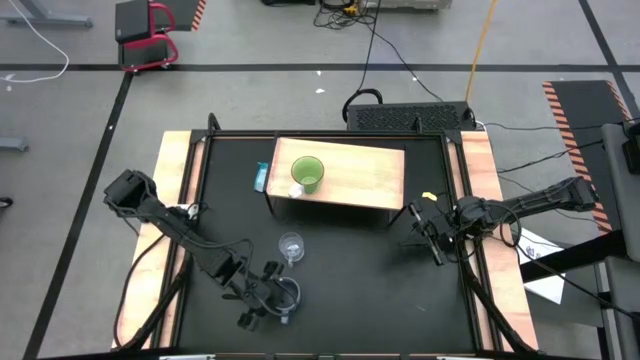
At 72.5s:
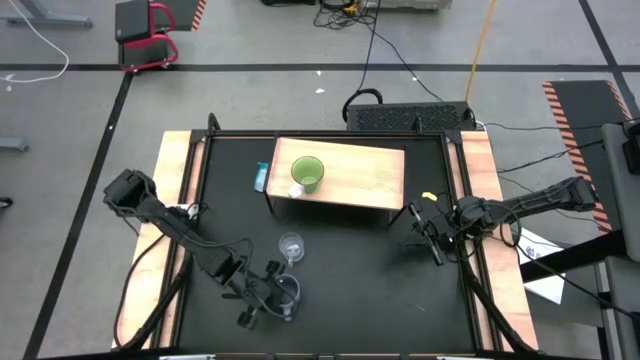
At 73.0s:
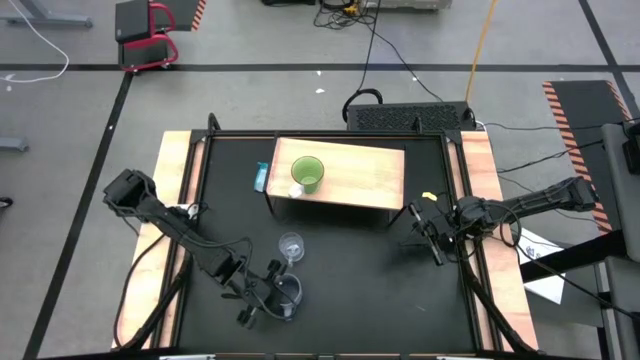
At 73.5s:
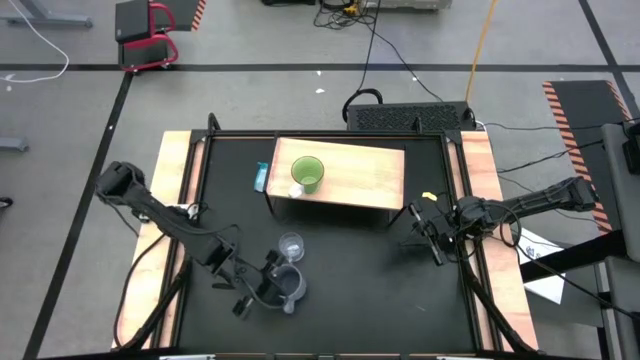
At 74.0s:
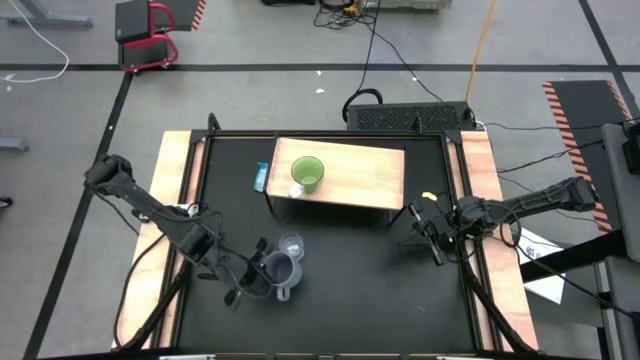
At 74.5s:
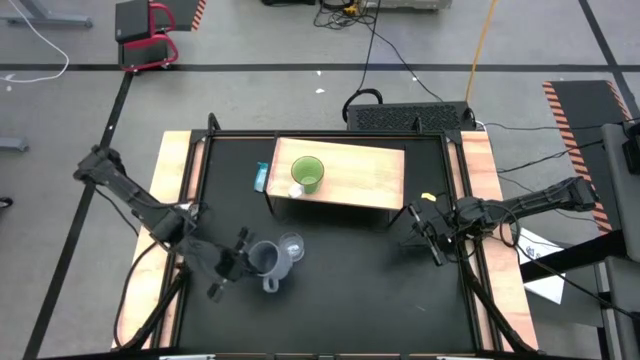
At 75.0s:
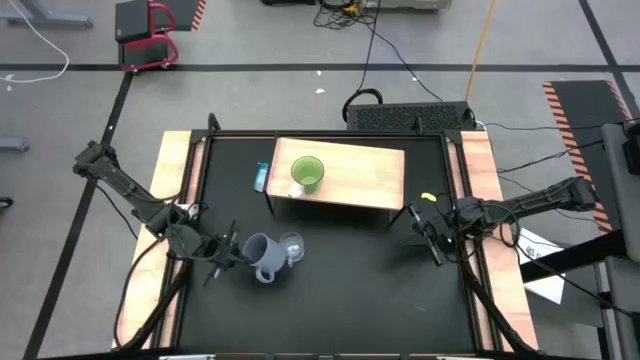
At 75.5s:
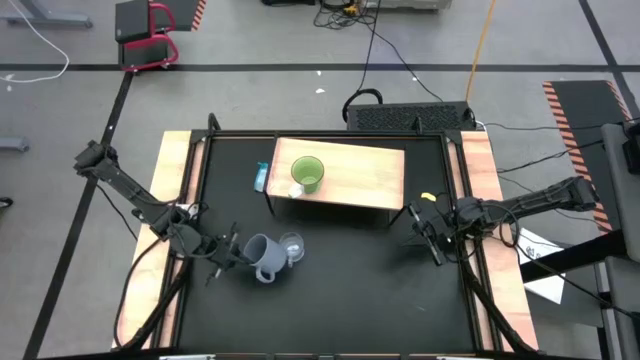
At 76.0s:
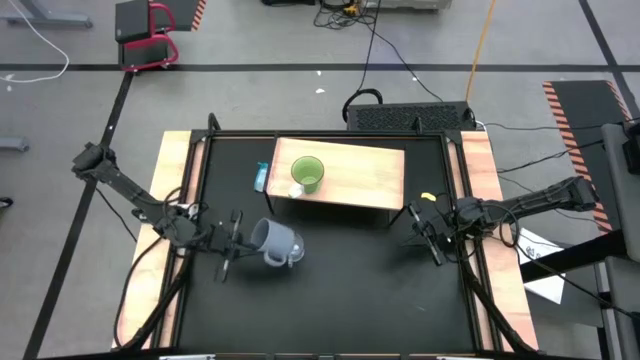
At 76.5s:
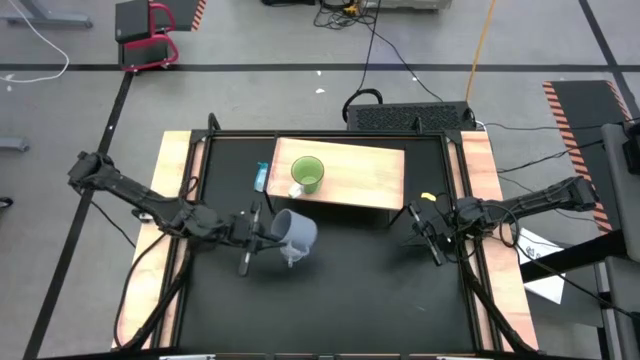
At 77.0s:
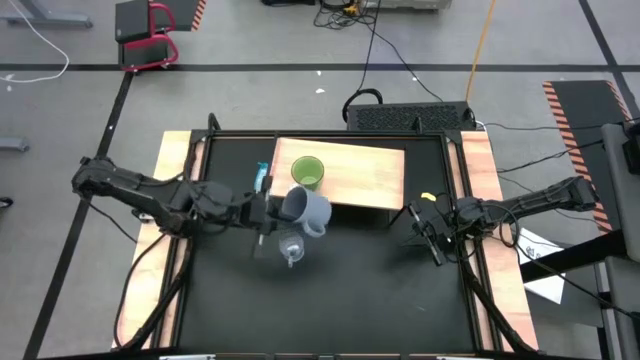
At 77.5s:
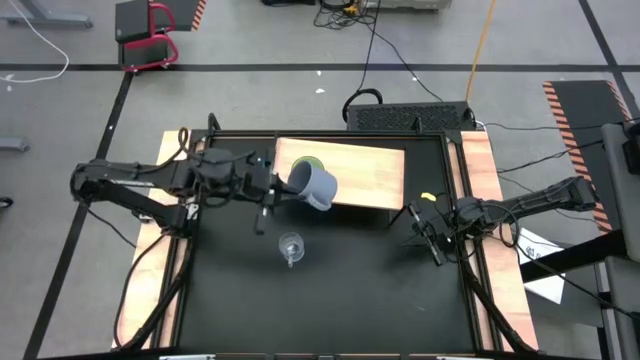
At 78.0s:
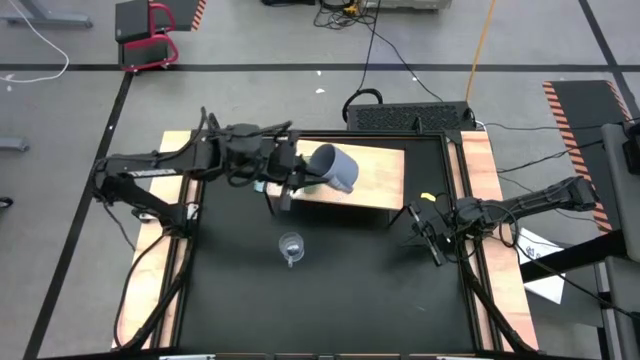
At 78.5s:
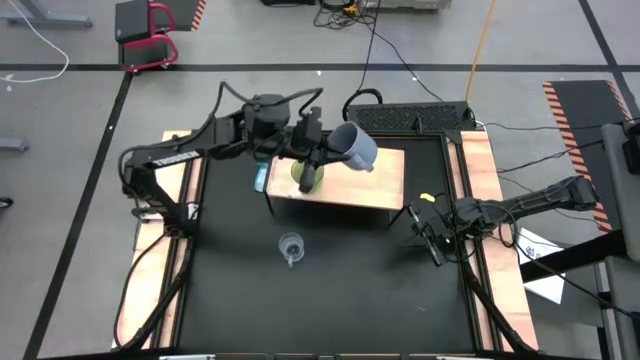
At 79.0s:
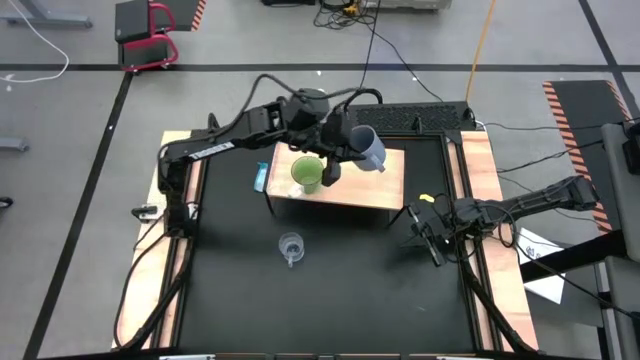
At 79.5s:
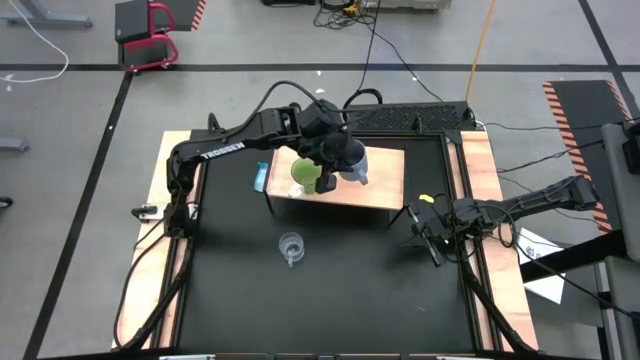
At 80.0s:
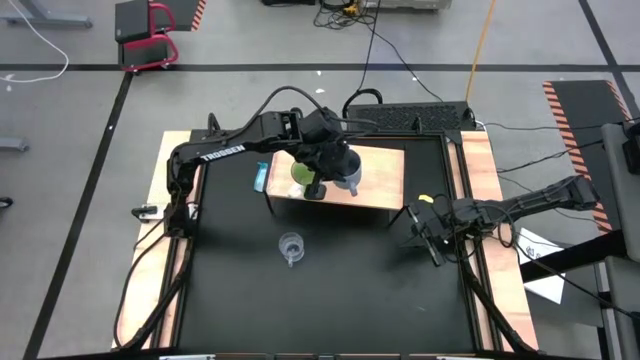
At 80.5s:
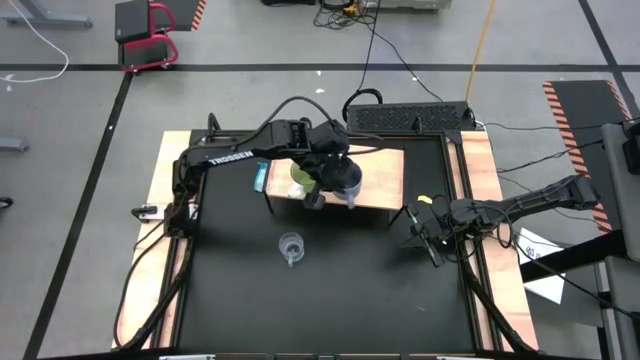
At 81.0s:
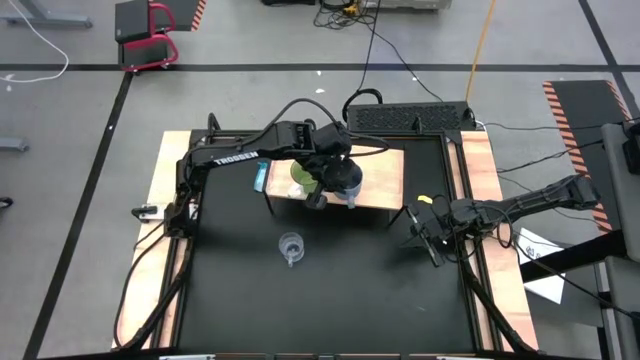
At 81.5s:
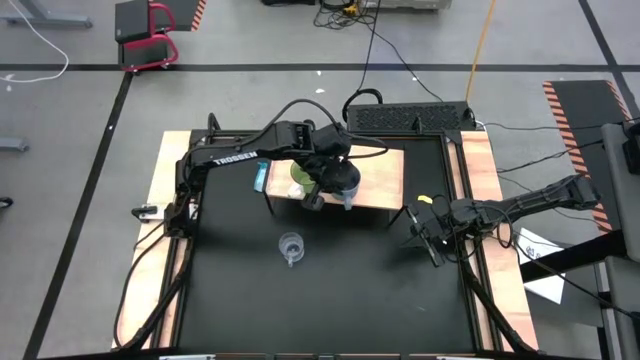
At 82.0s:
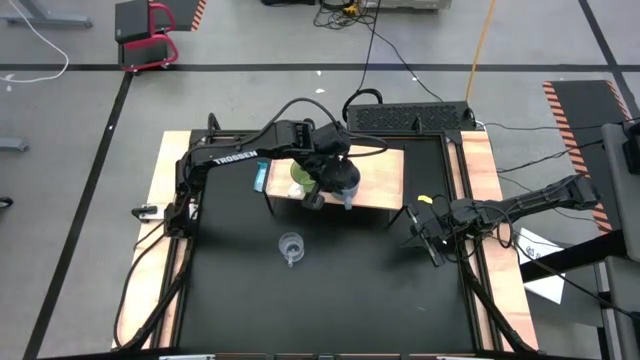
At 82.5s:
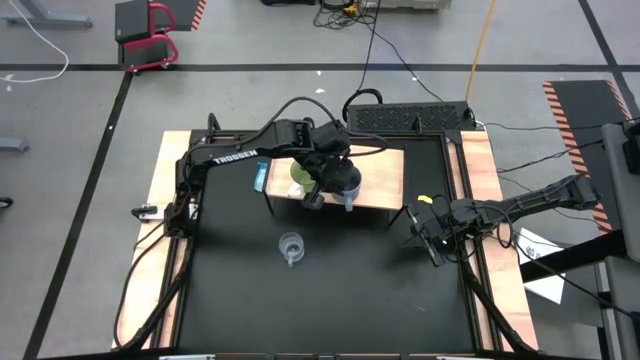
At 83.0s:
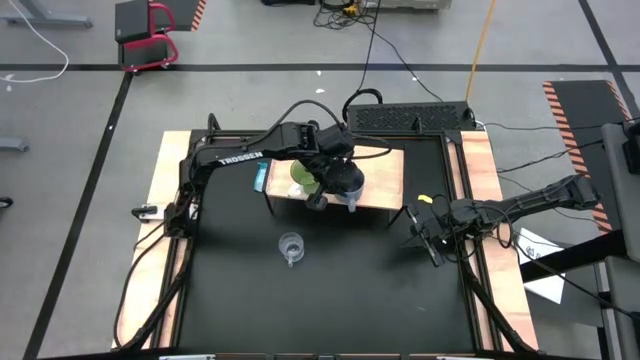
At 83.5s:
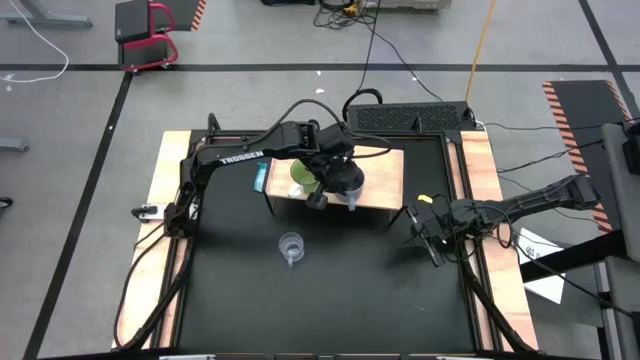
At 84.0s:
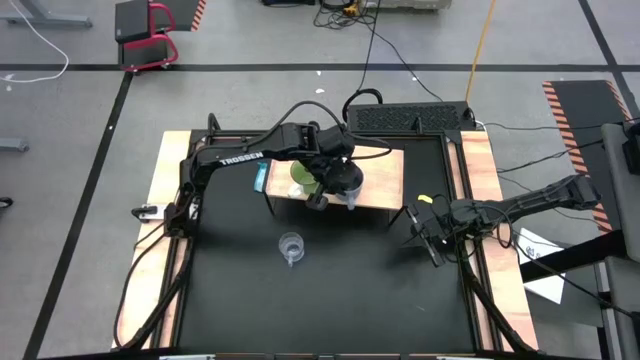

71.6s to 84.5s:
Task: Stack small to large cups/mugs on shelf
Put the gray cup on the shelf

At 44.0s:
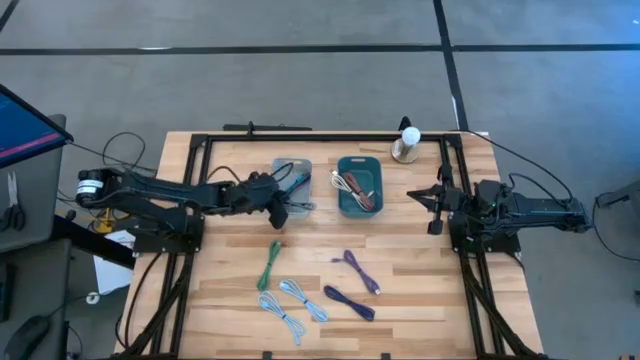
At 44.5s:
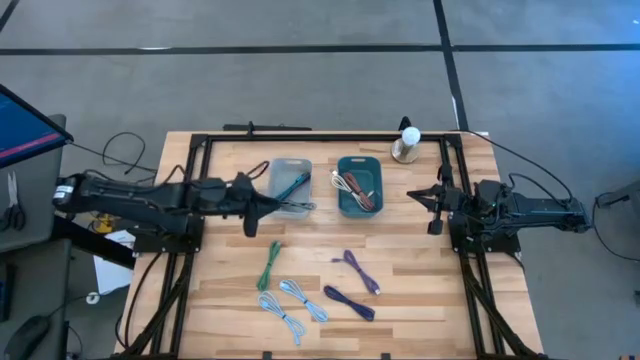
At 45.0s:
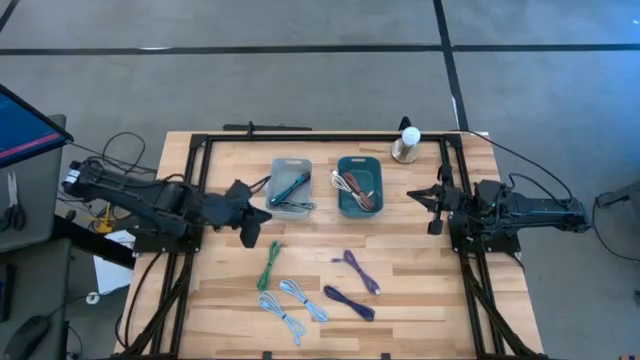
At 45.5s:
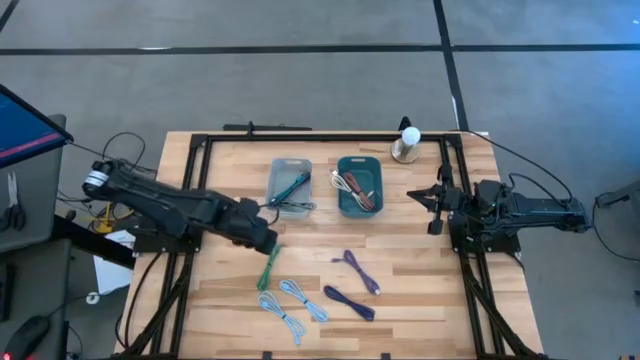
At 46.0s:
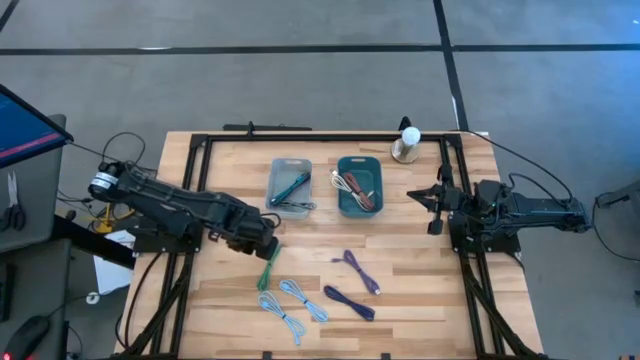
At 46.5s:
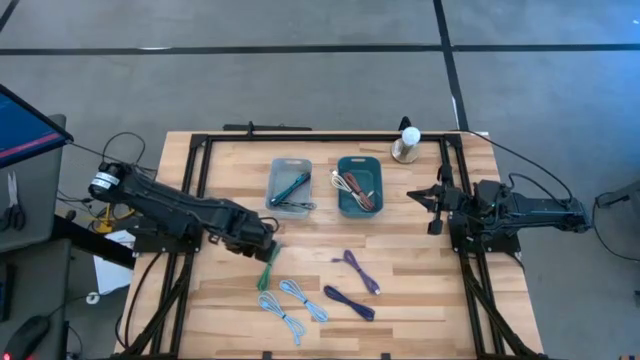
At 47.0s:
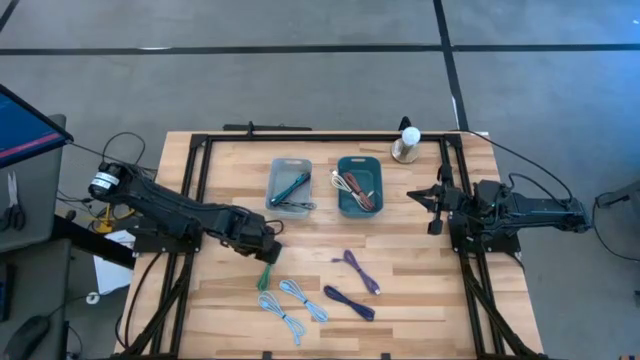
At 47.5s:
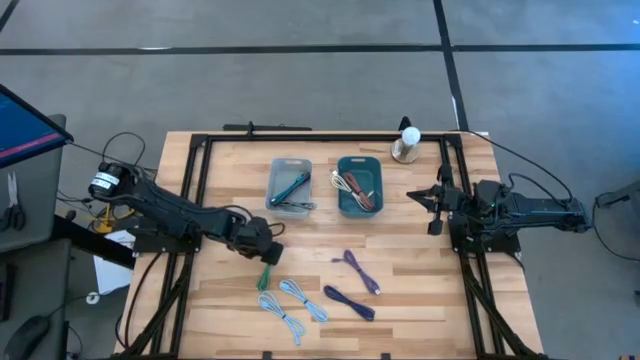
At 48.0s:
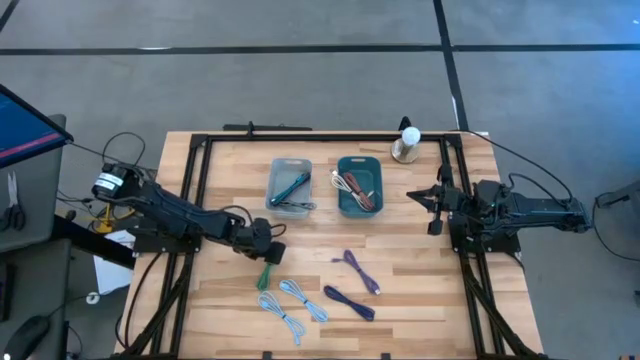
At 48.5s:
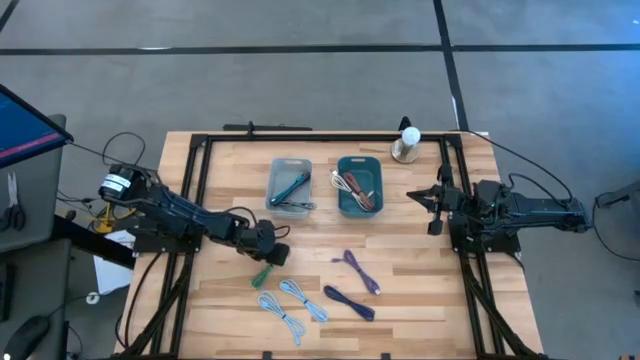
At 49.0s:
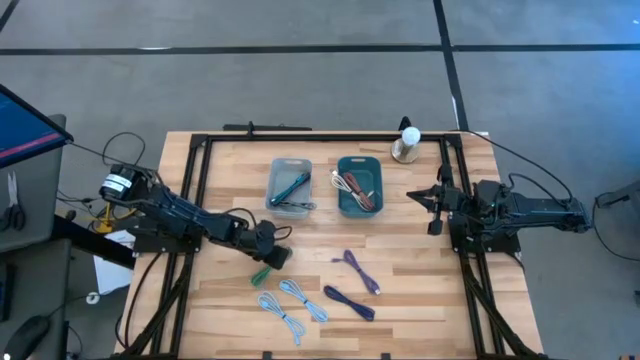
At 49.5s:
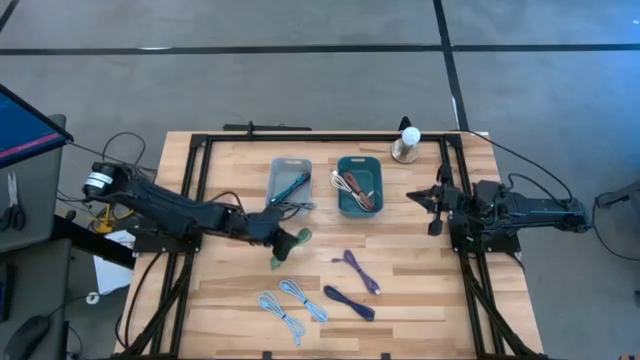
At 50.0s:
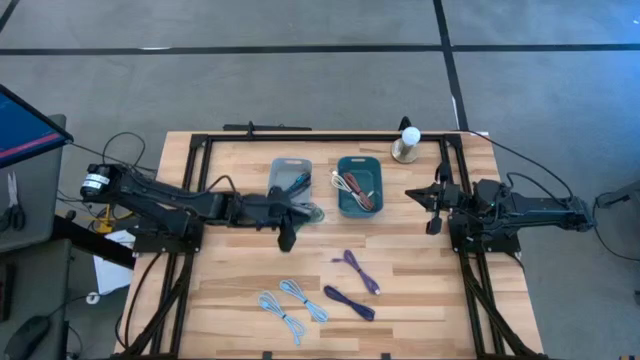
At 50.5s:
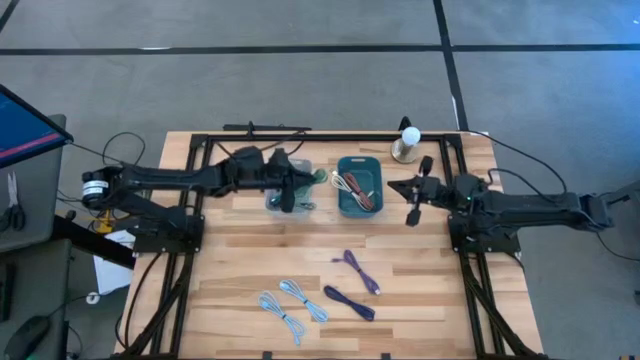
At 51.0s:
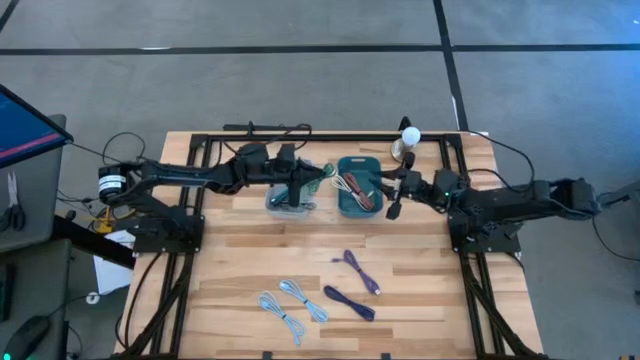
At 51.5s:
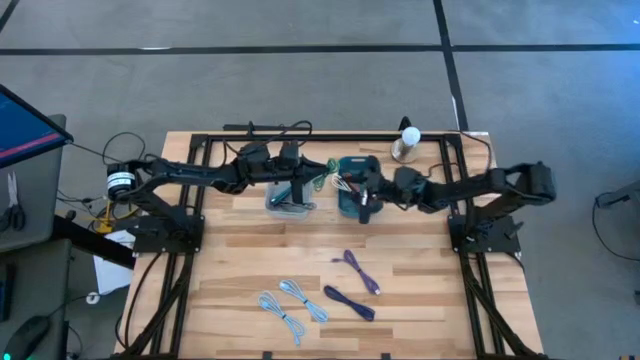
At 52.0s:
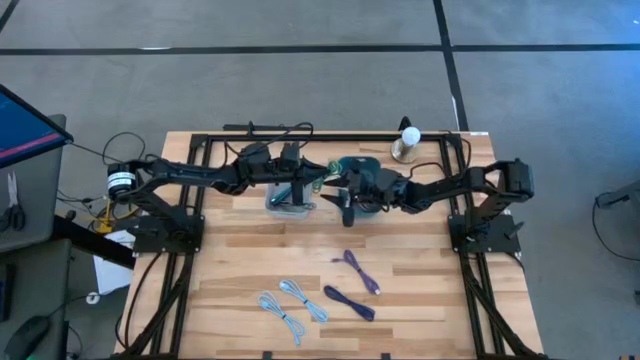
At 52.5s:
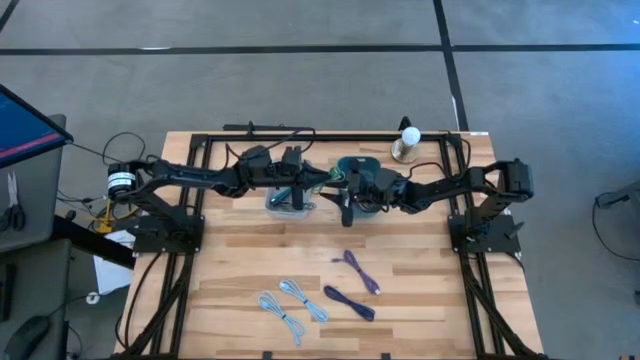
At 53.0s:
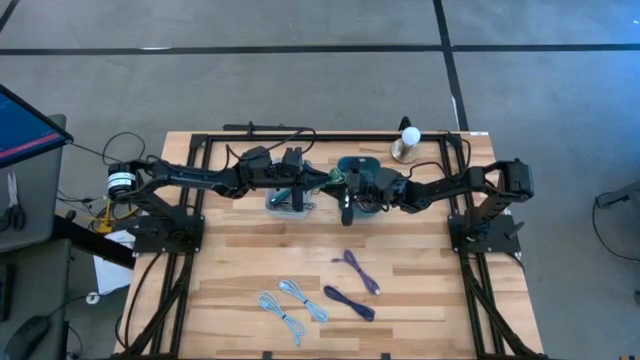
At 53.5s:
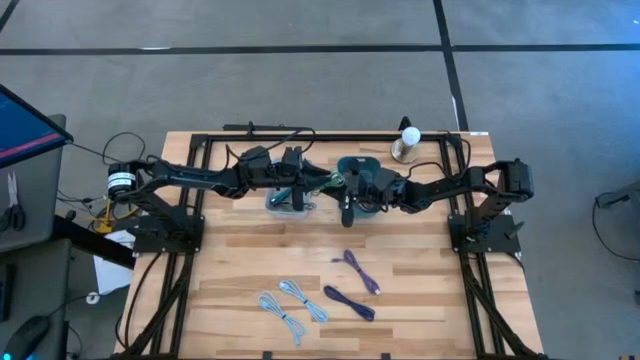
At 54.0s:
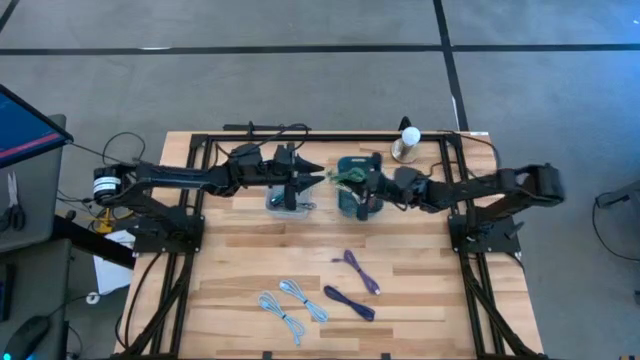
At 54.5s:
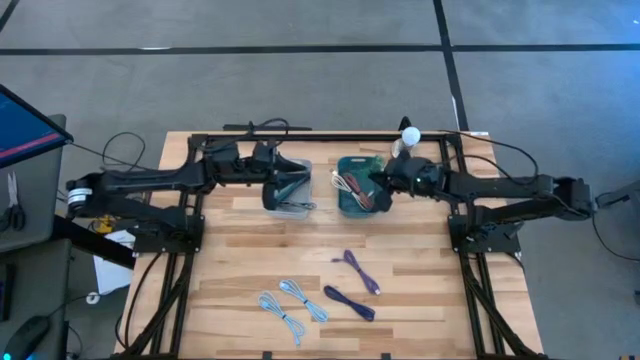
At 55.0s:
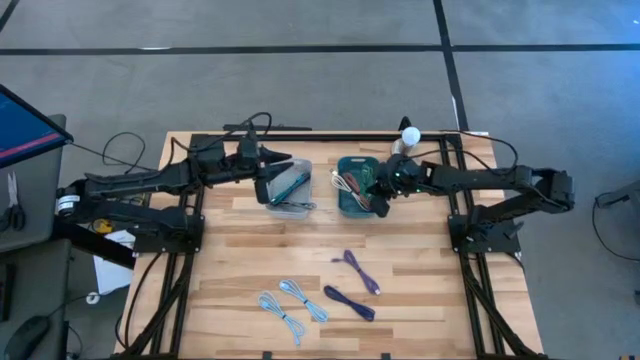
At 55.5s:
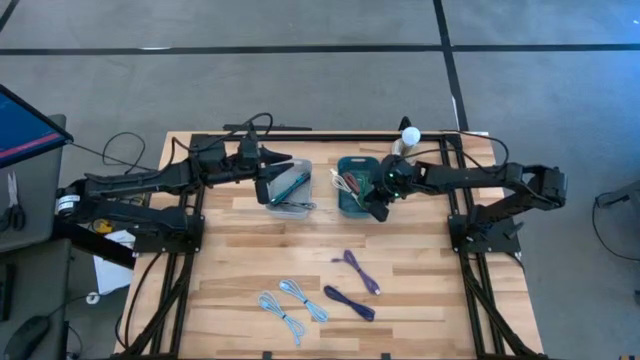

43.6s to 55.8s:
Task: Pick & Place USB Port
Put the green charger cable into the blue bin
